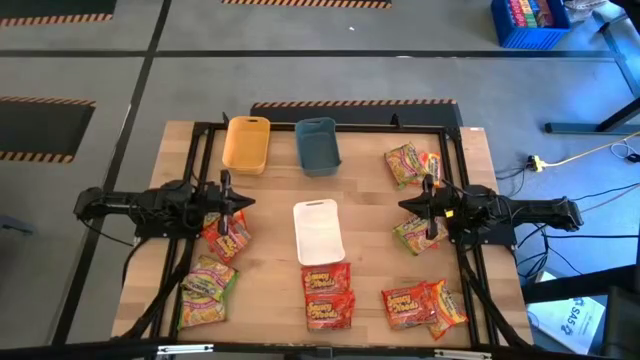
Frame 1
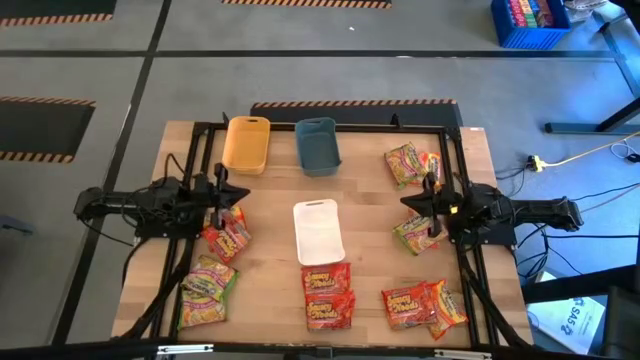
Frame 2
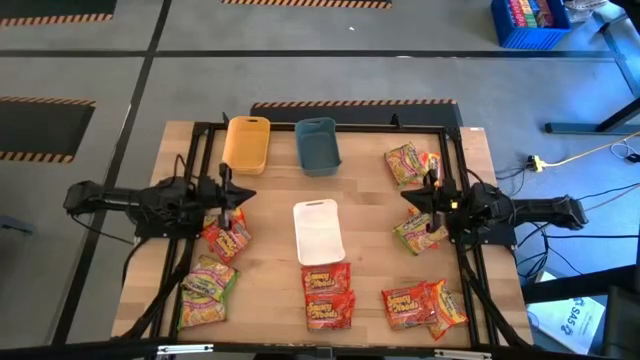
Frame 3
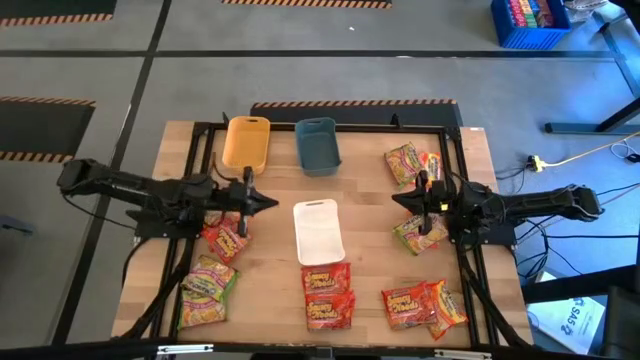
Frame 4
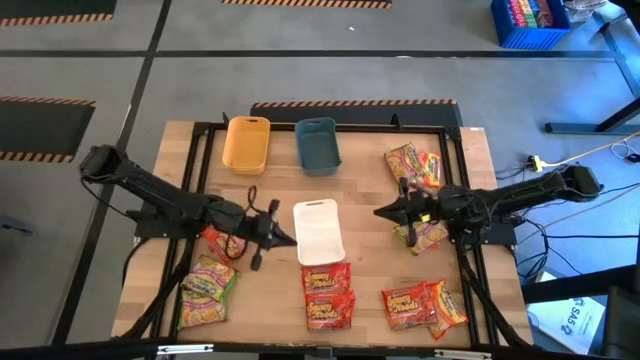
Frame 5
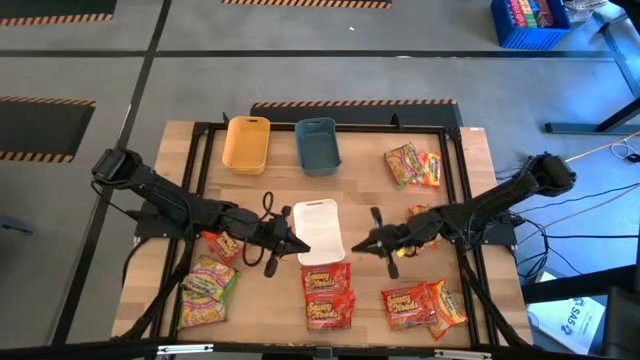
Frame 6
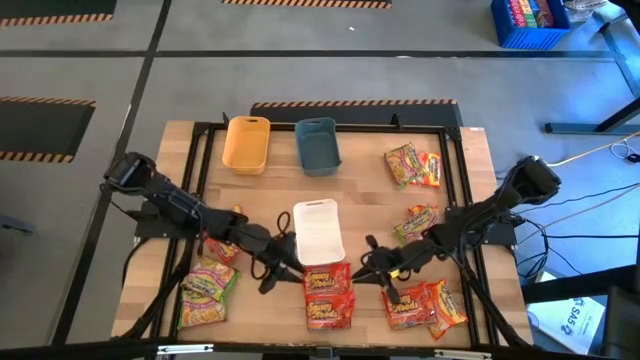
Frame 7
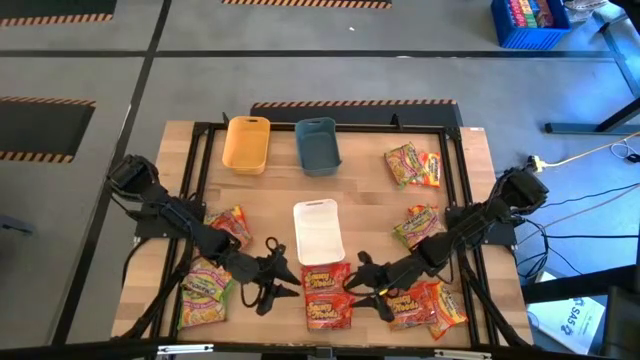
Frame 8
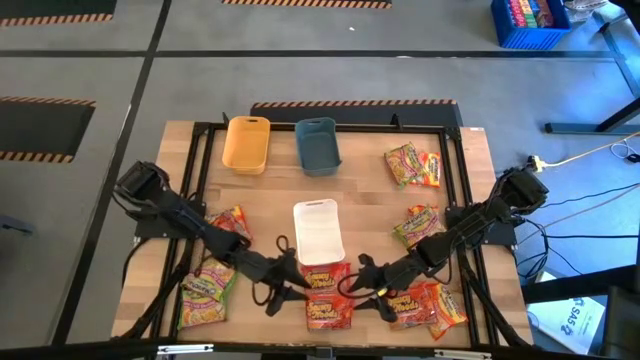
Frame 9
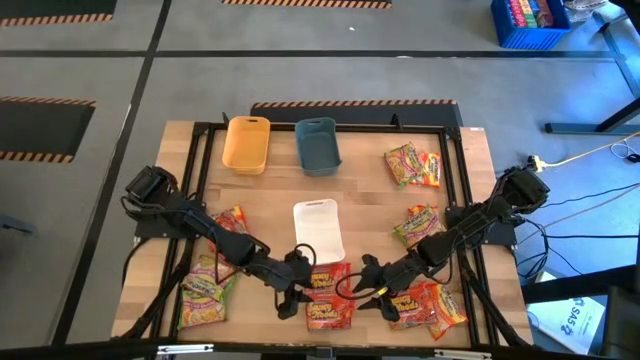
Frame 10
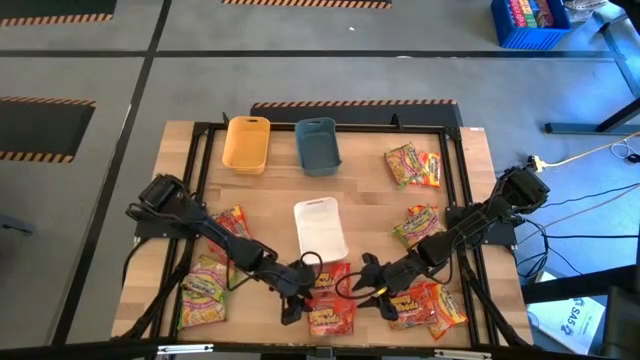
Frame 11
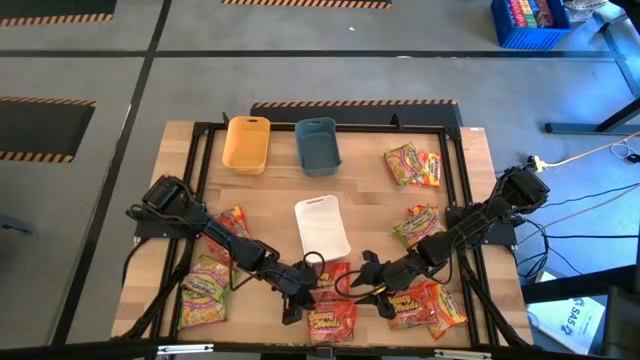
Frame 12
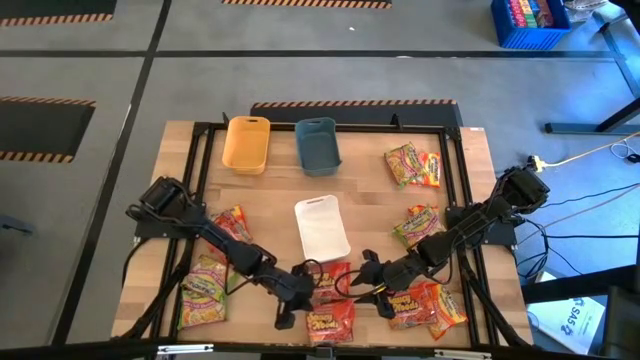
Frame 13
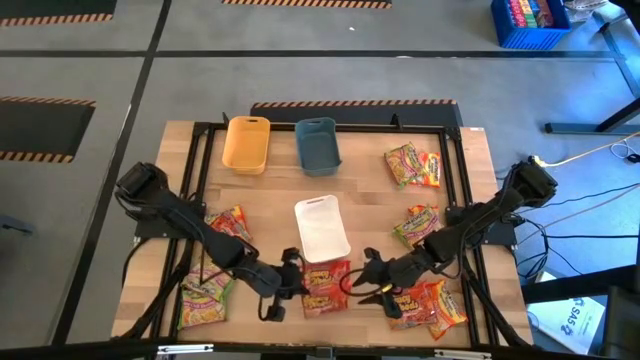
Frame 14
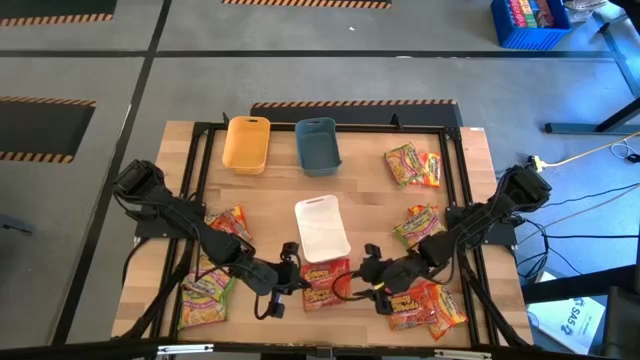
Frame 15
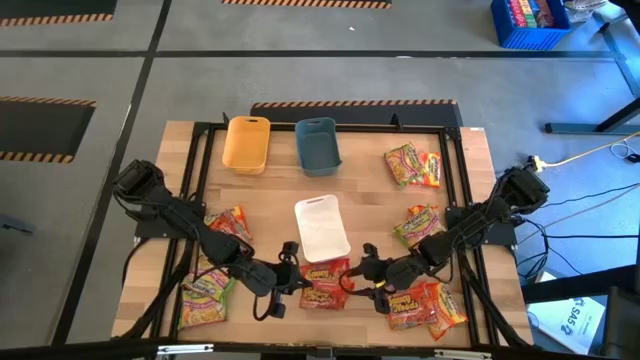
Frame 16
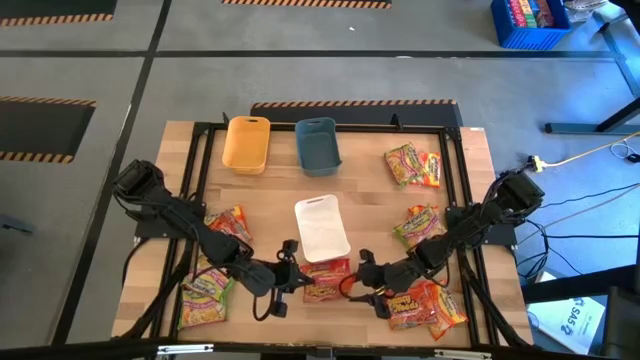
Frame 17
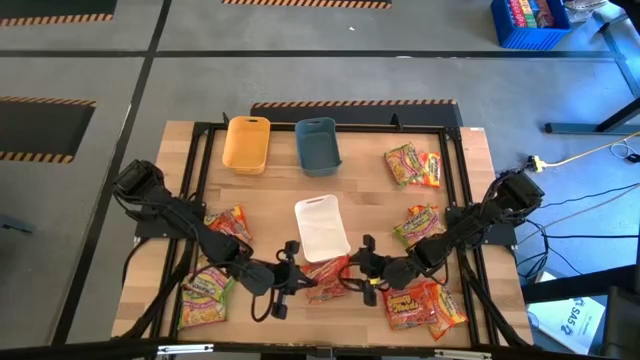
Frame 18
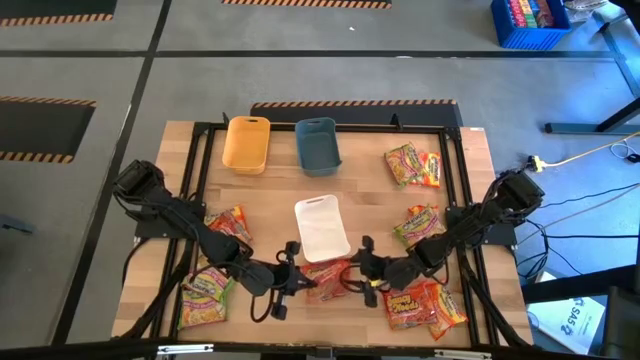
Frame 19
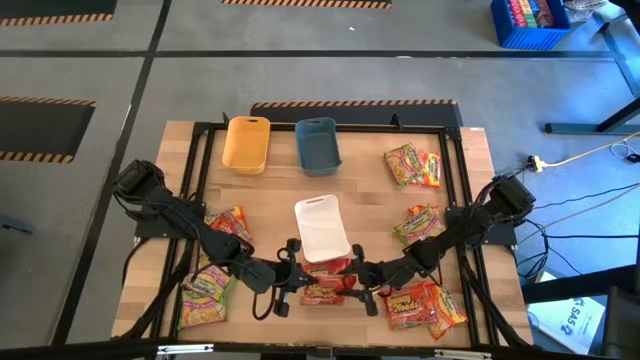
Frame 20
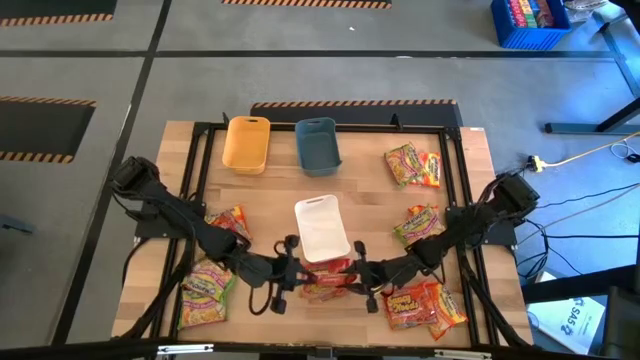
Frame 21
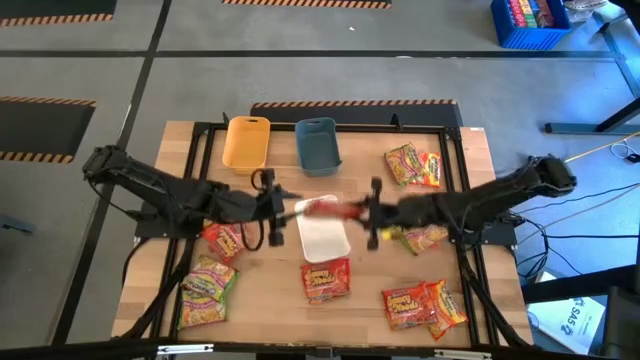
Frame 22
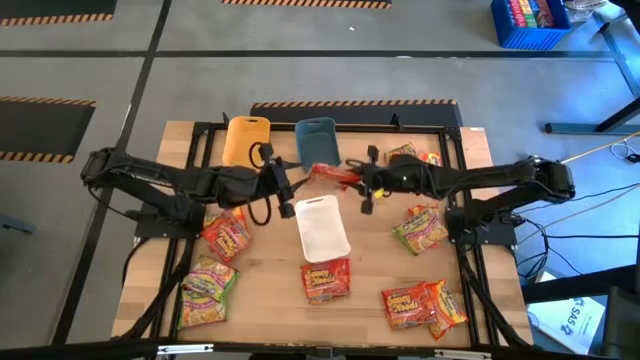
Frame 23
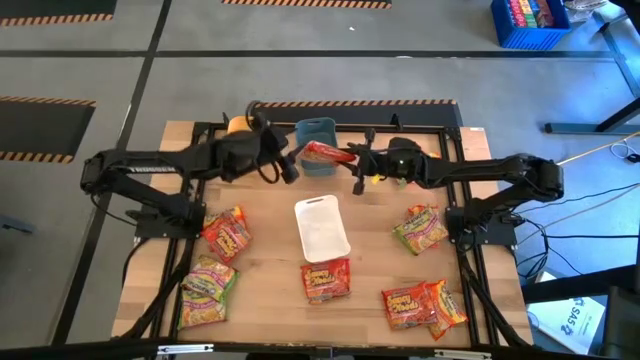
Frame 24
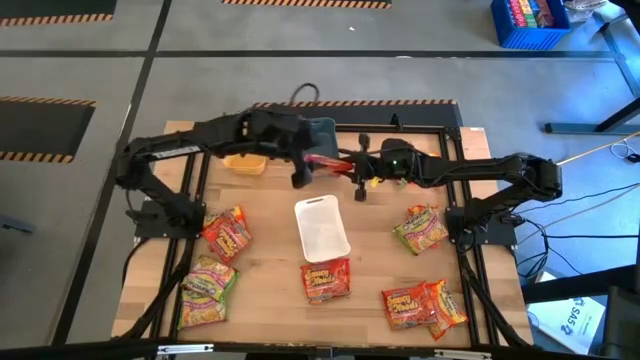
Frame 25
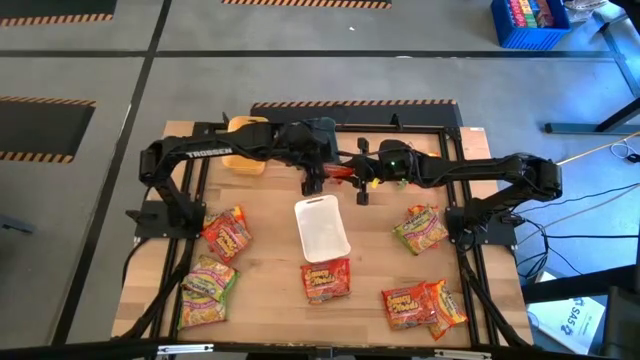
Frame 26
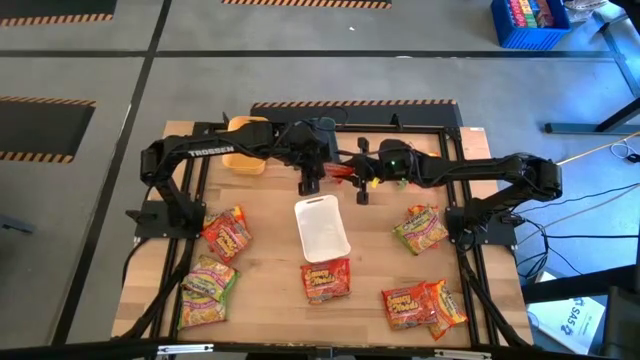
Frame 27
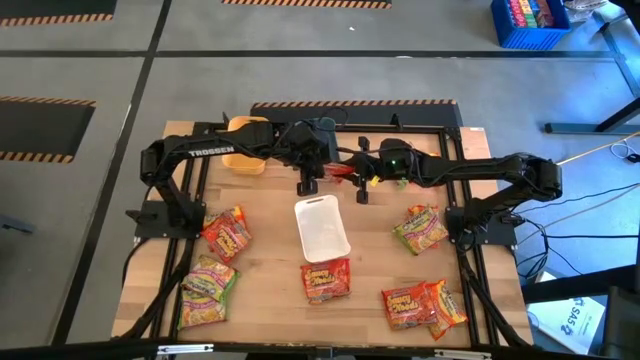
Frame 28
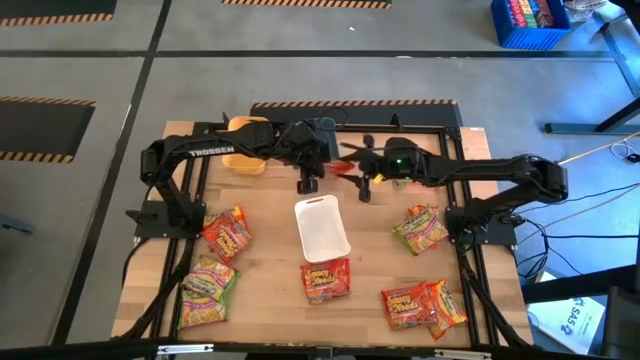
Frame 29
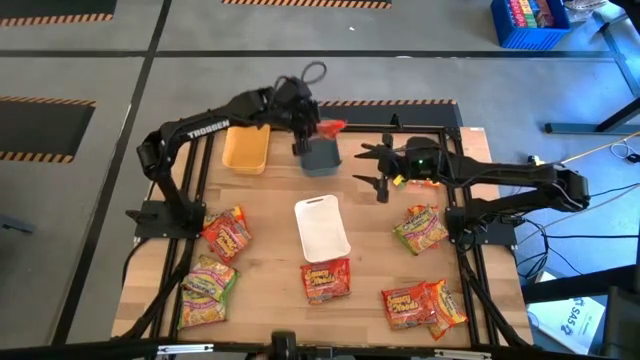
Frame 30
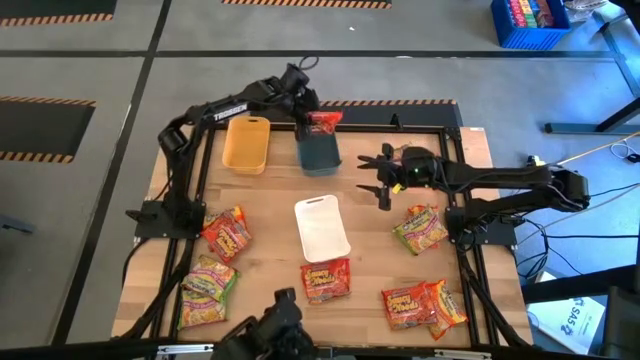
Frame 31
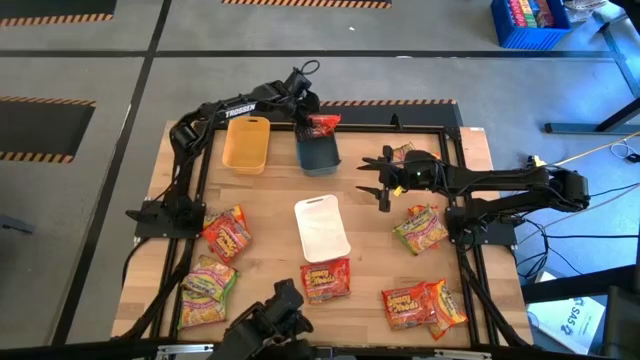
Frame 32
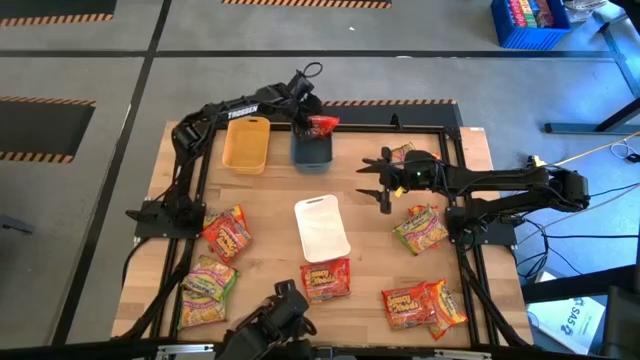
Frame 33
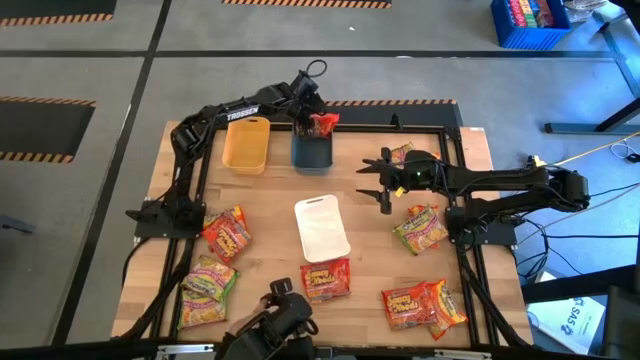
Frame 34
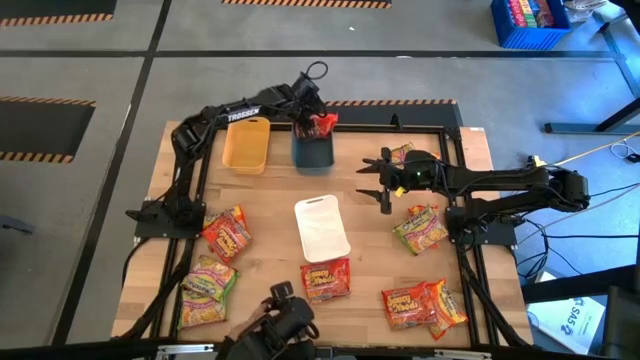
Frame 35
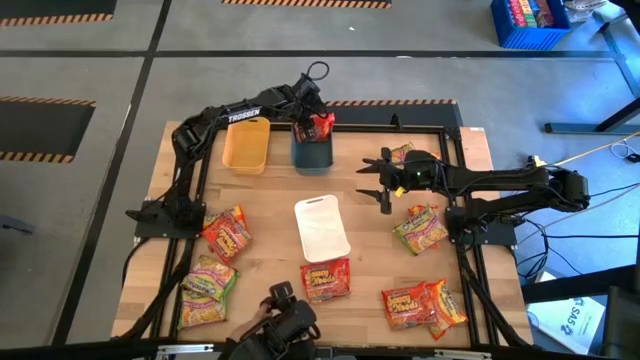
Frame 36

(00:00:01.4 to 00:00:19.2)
Task: Sort Maruchan noodles
Put the red noodle pack into the blue bin
